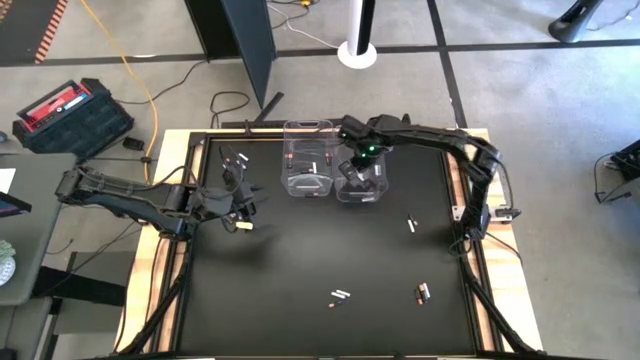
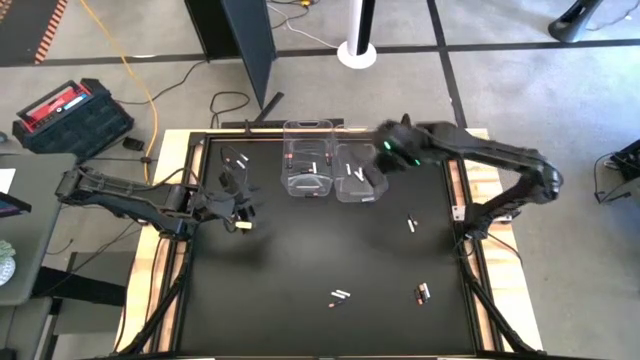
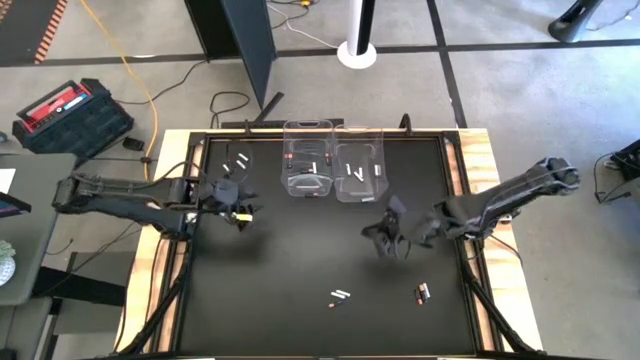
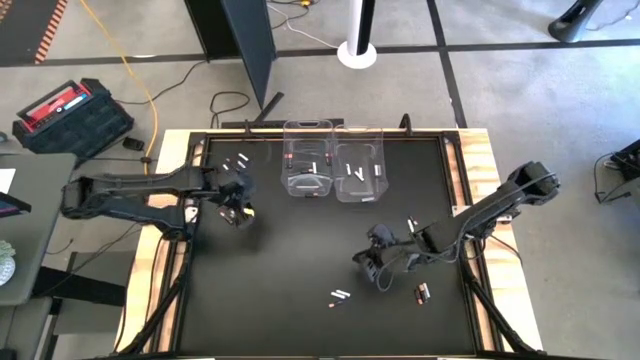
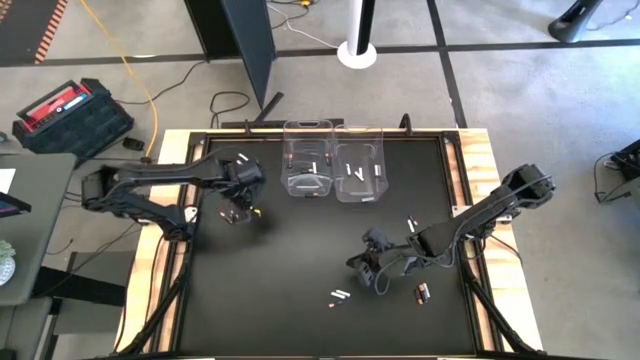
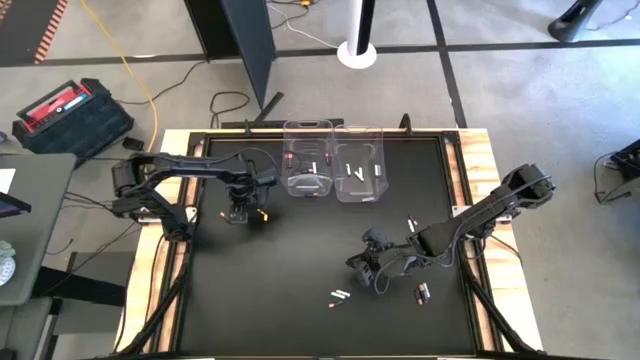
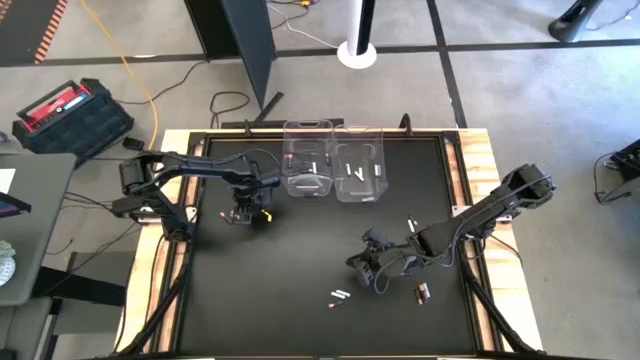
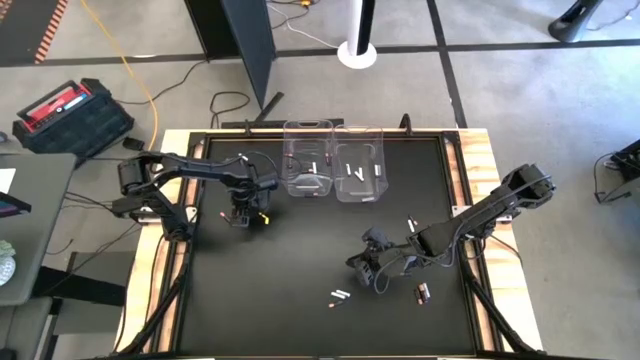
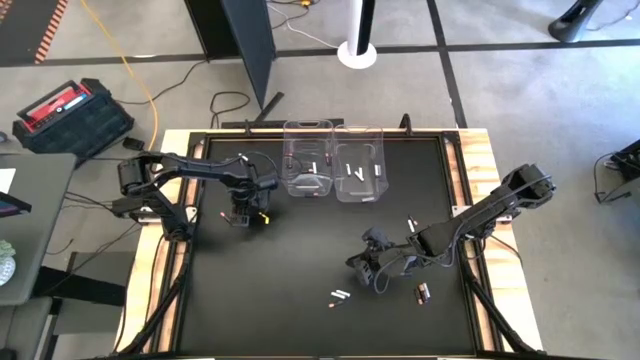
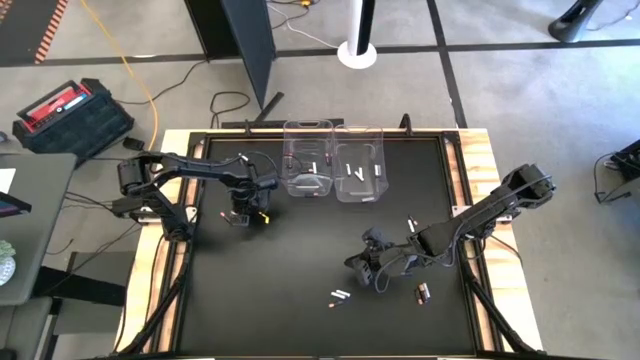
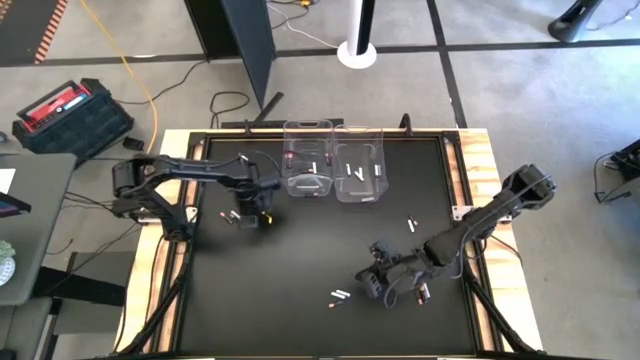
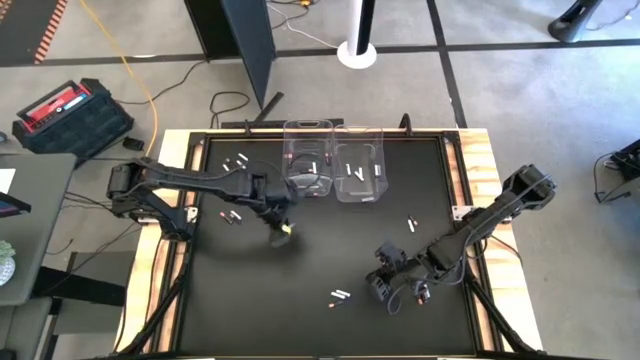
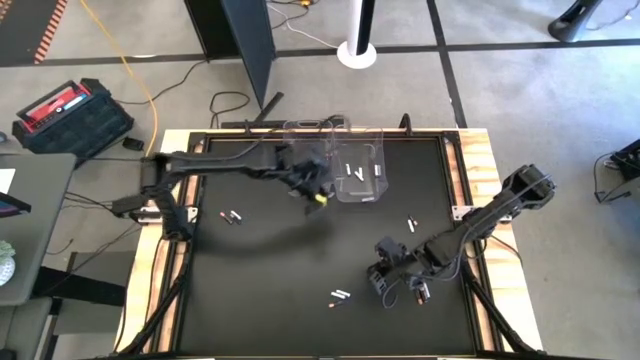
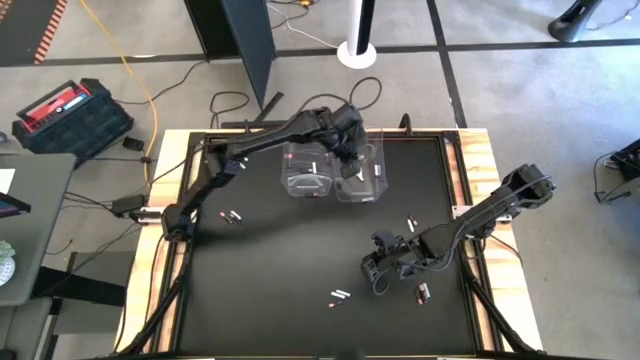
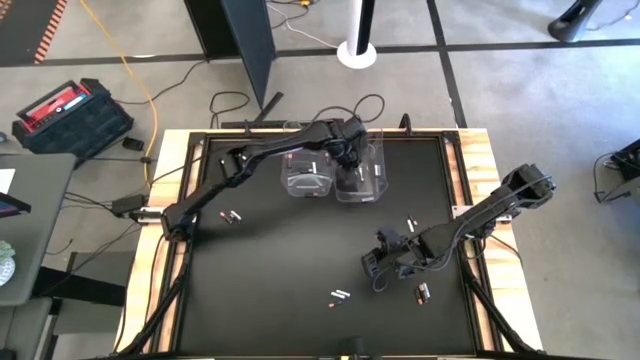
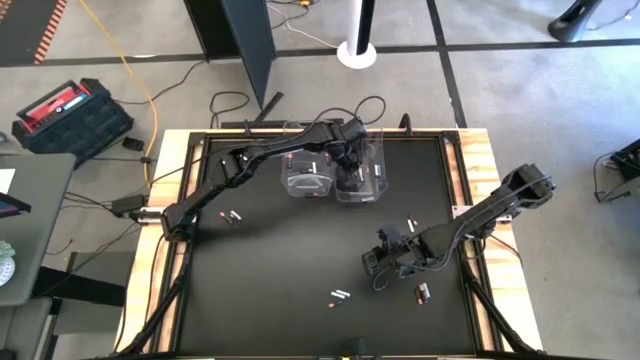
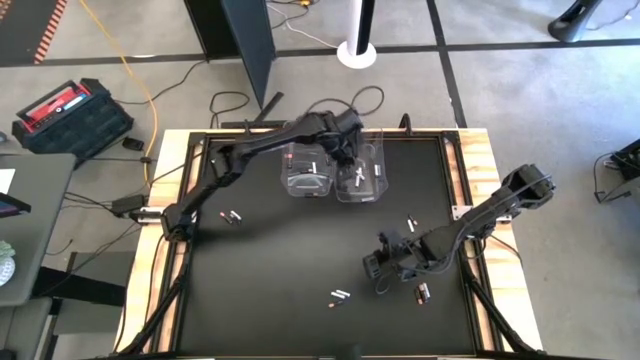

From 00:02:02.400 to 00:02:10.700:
Task: Sort batteries
Put the white battery into the right transparent bin

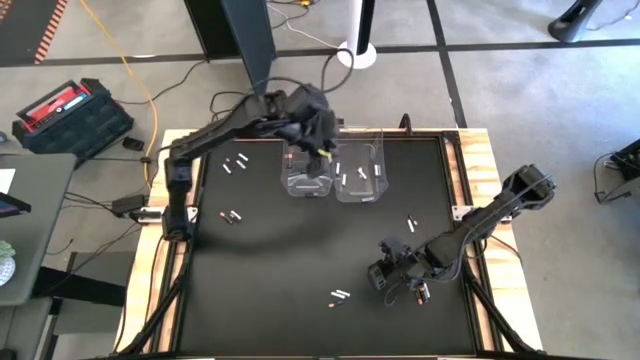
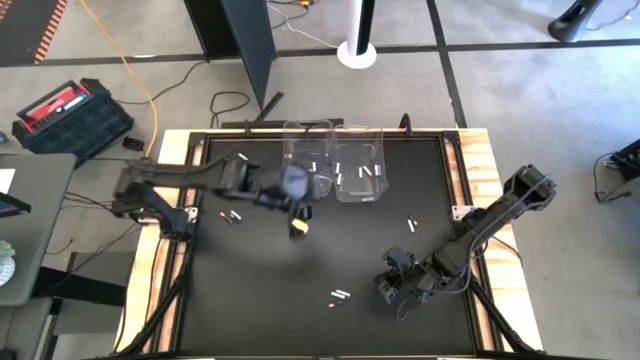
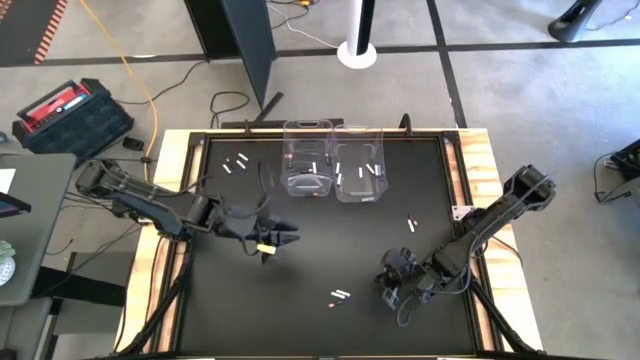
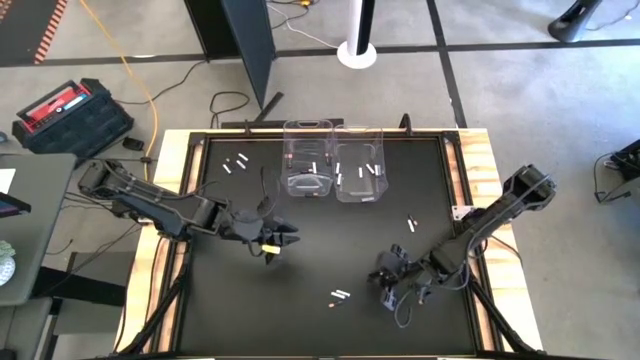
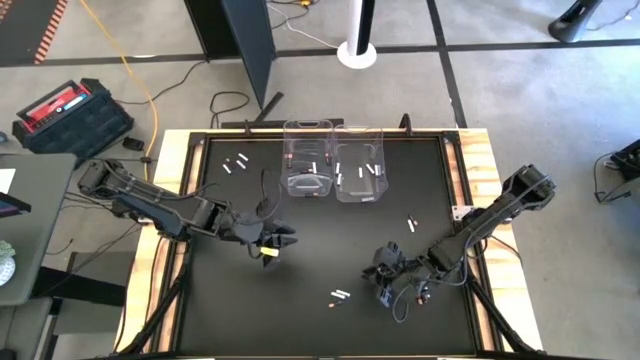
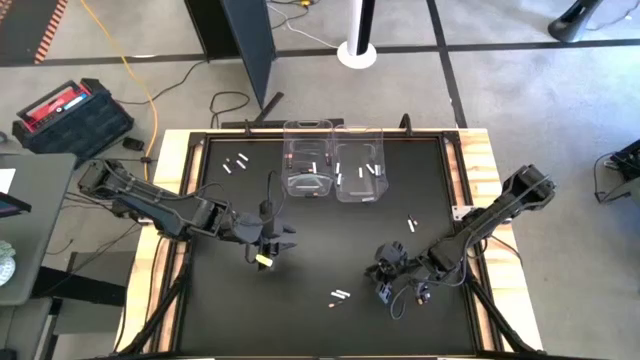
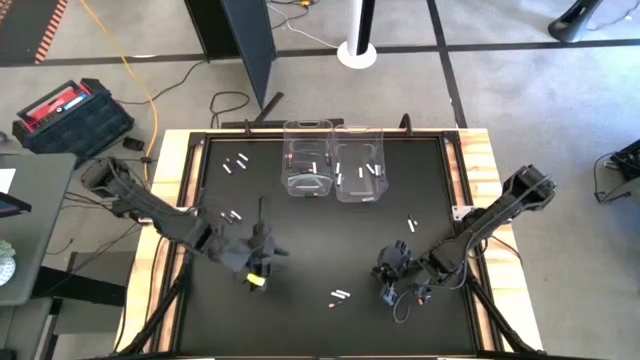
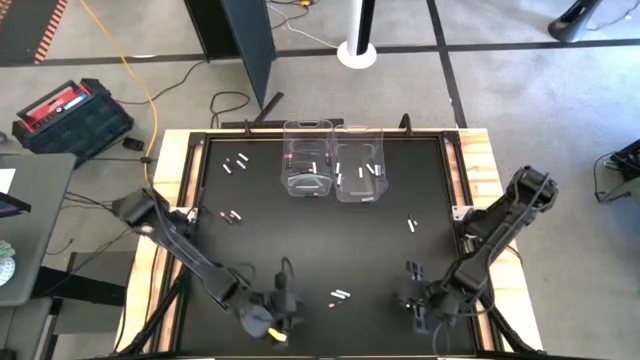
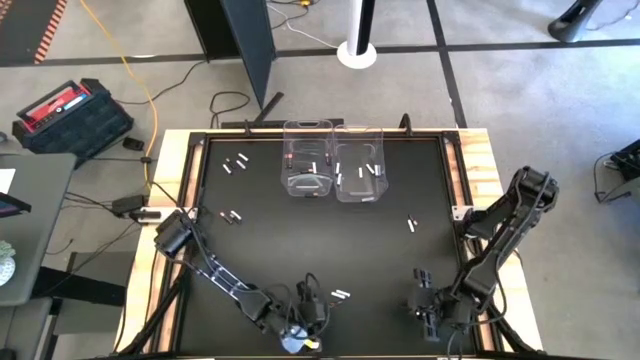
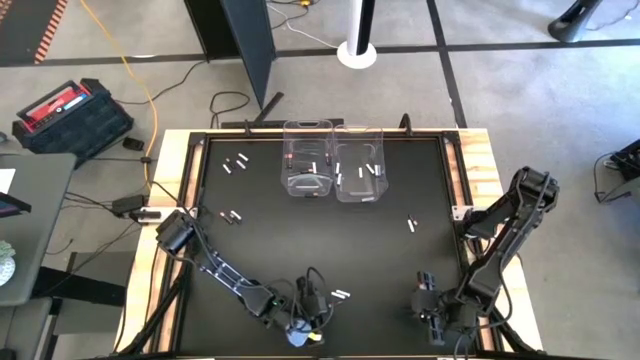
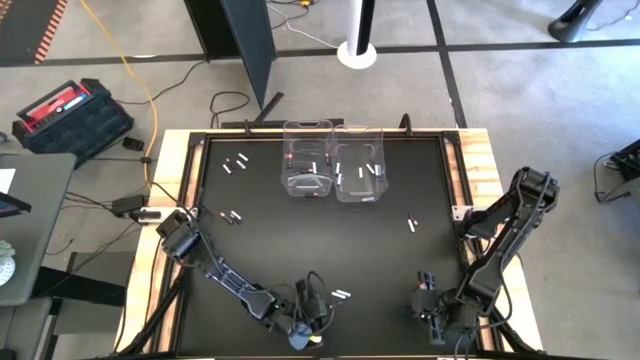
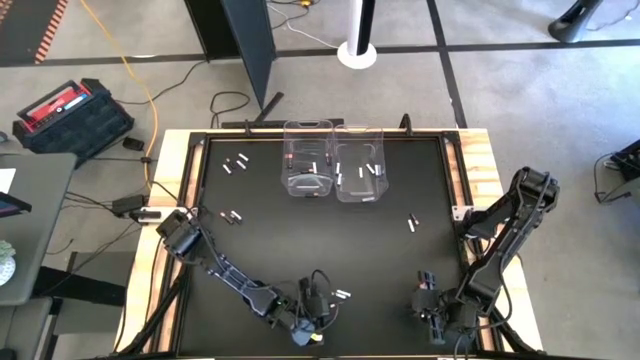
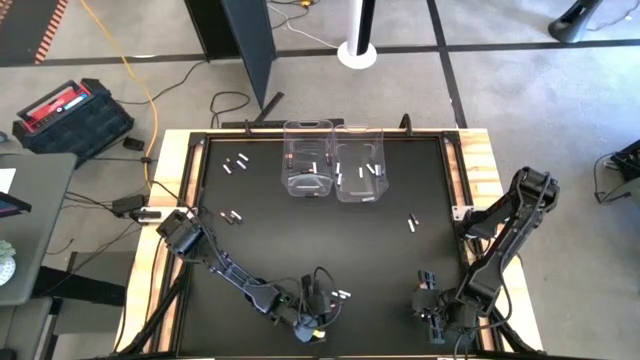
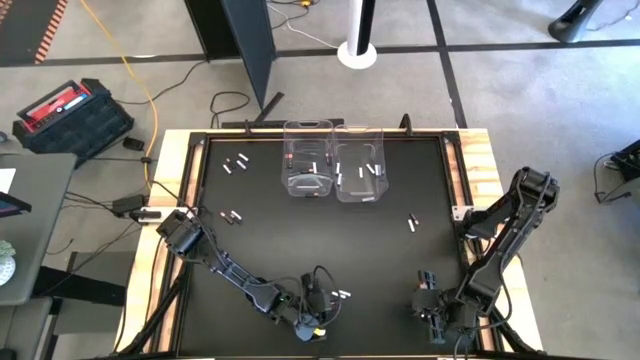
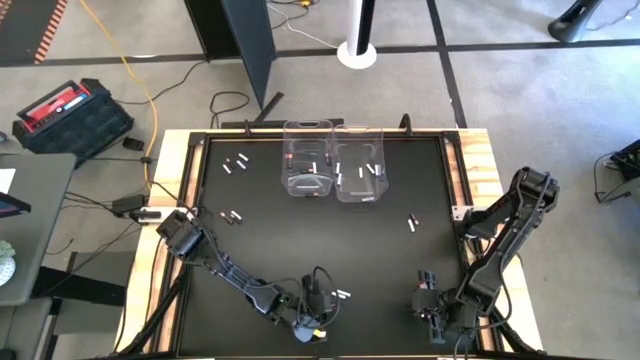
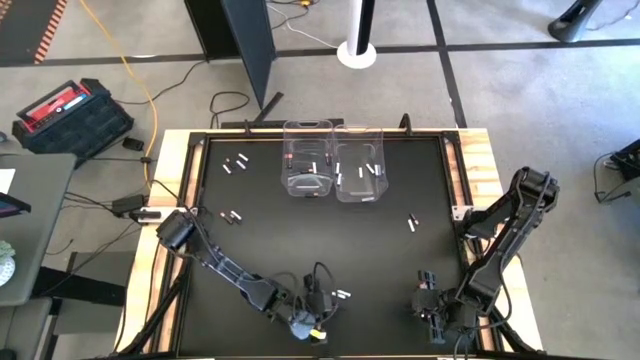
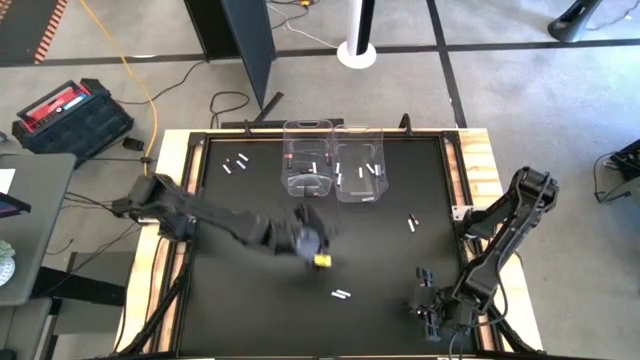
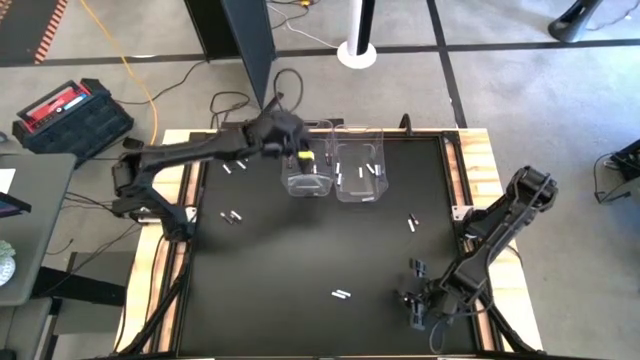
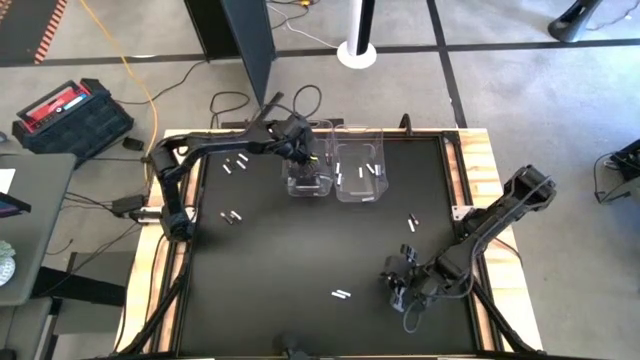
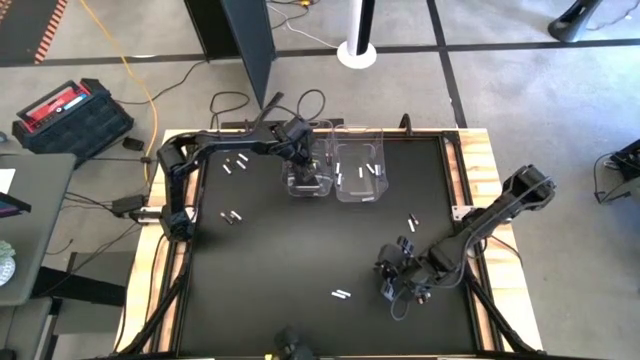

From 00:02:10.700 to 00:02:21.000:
Put the black battery into the left transparent bin

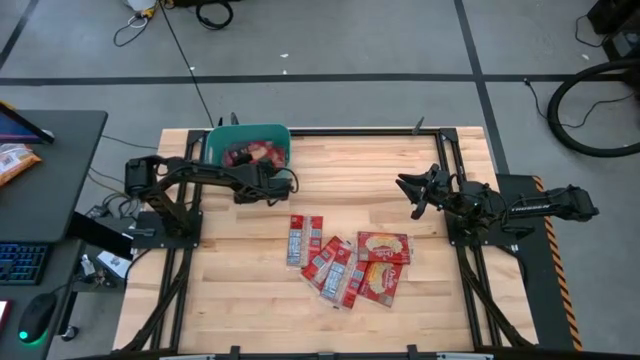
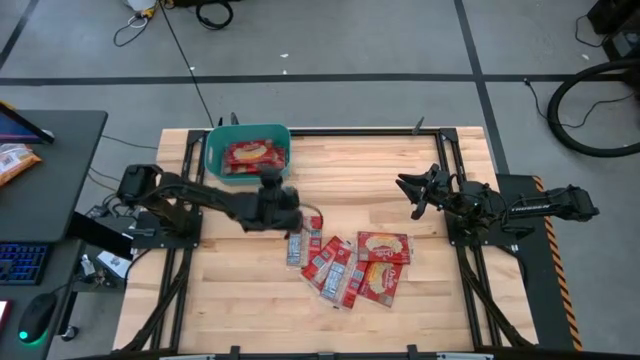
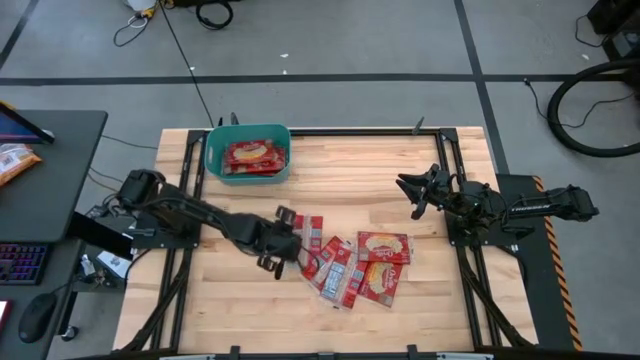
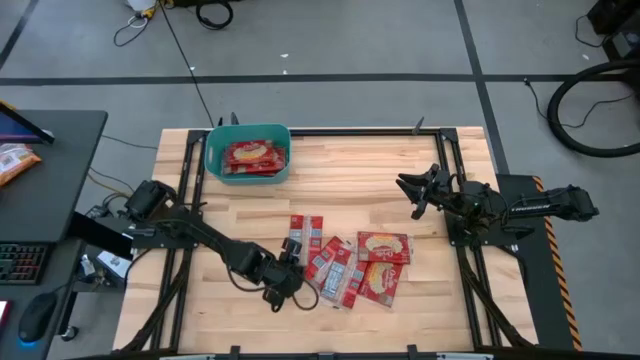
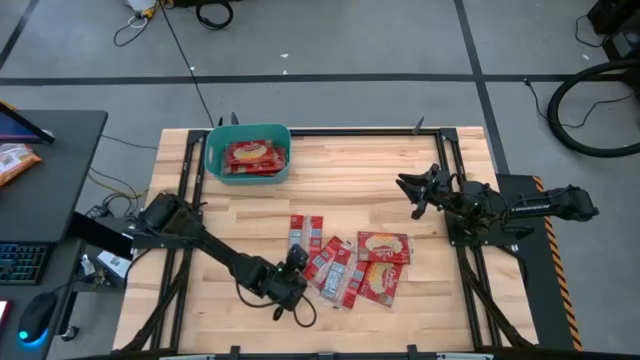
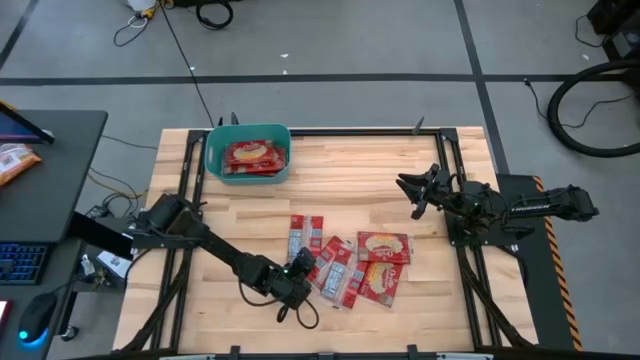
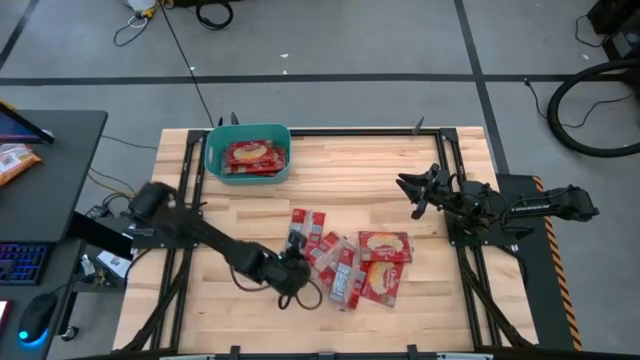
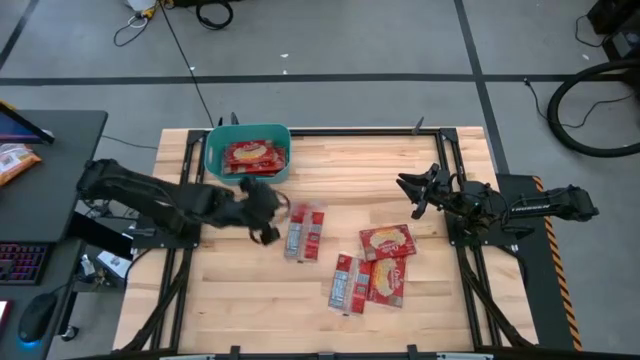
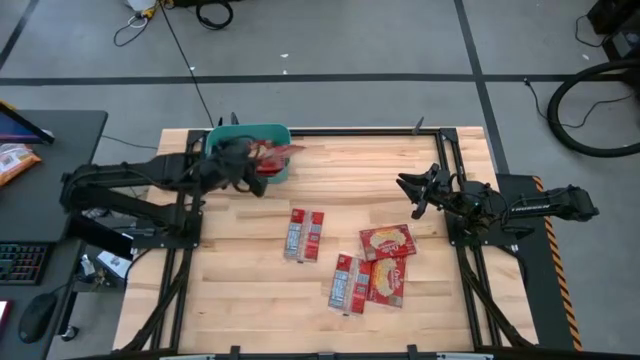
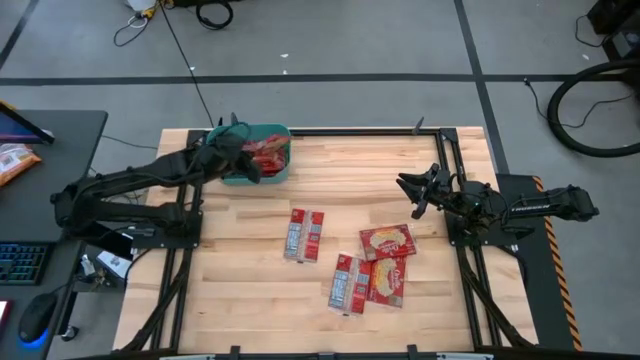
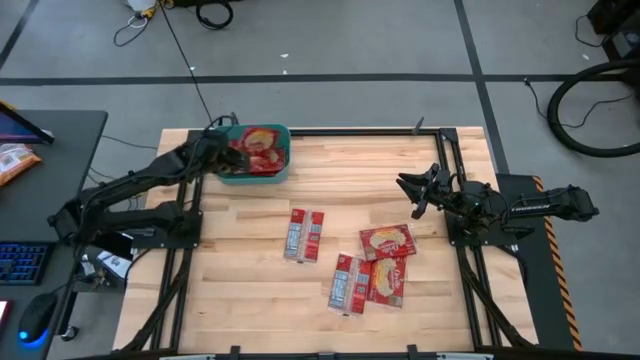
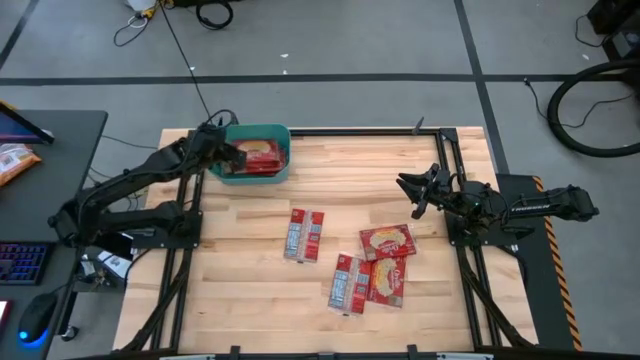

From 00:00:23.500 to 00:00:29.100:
Task: Sort popcorn bags into baskets
Put the red popcorn bag into the blue bin
